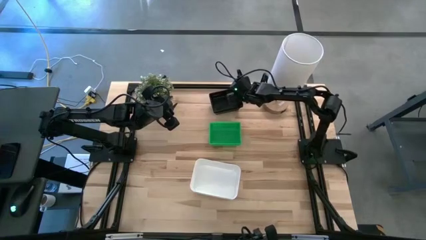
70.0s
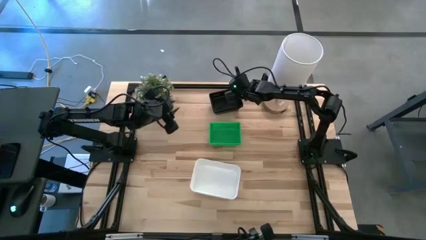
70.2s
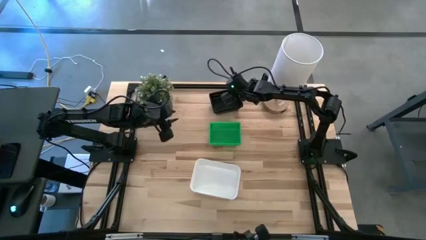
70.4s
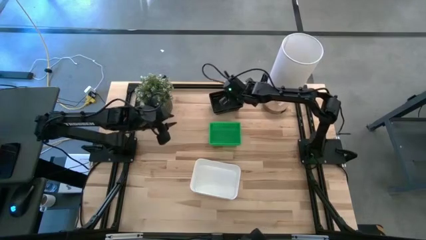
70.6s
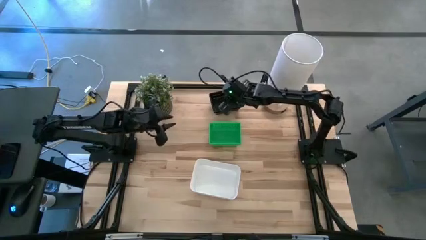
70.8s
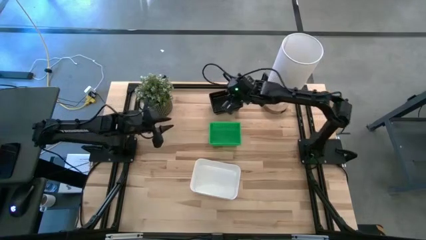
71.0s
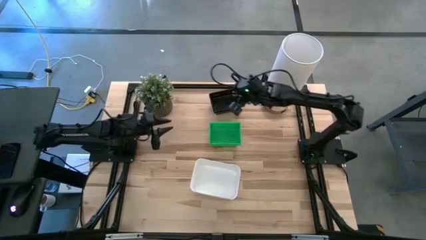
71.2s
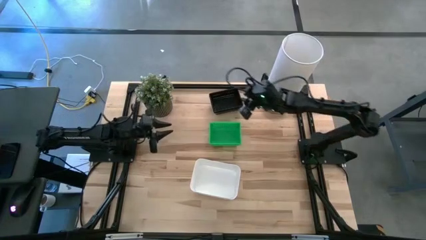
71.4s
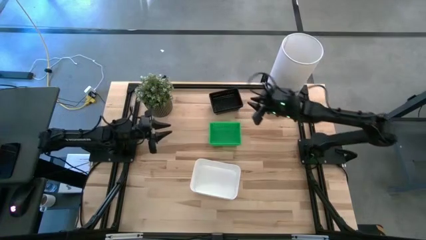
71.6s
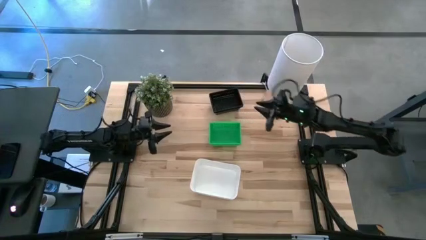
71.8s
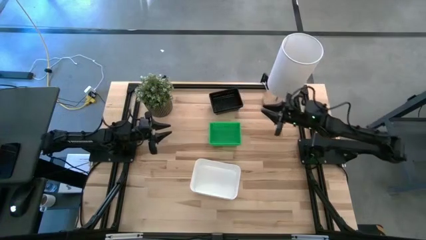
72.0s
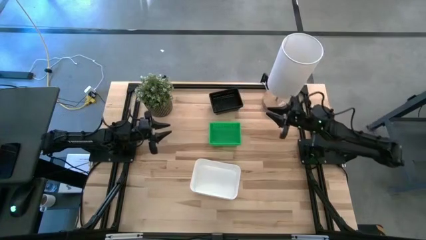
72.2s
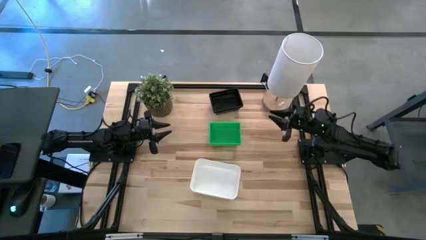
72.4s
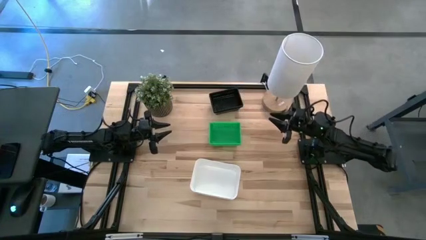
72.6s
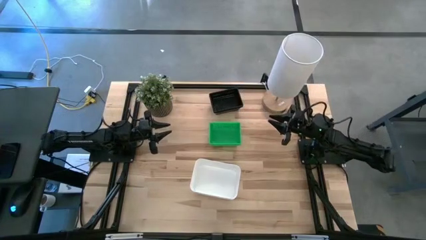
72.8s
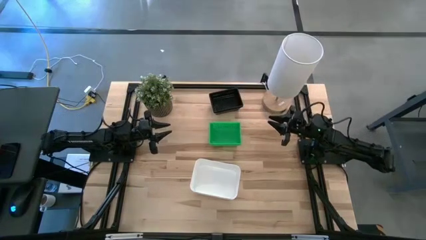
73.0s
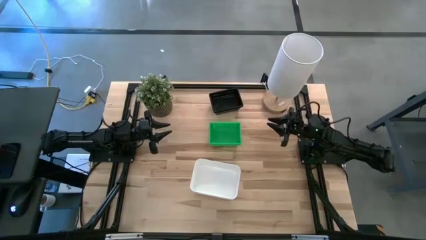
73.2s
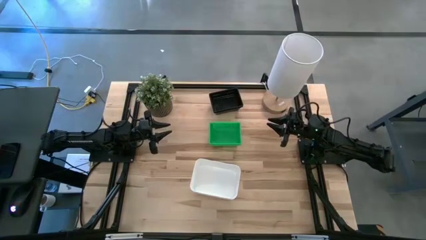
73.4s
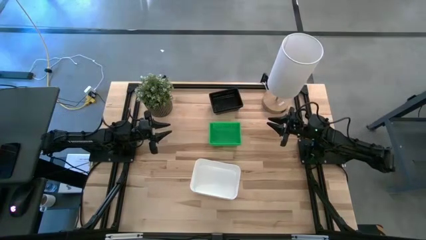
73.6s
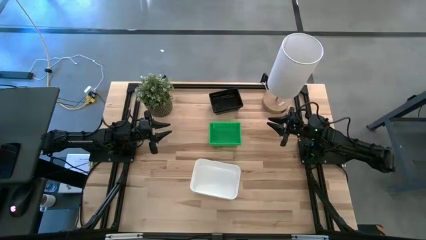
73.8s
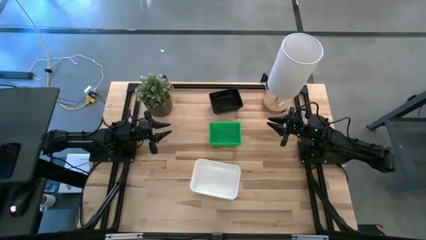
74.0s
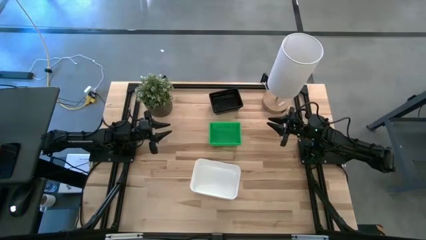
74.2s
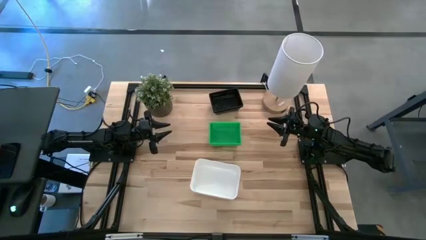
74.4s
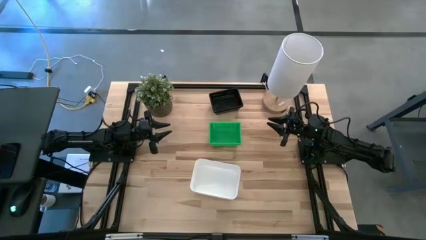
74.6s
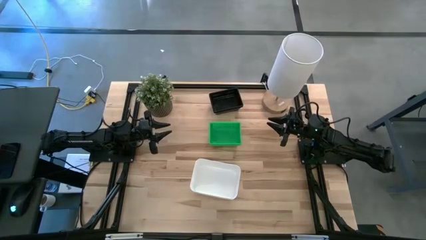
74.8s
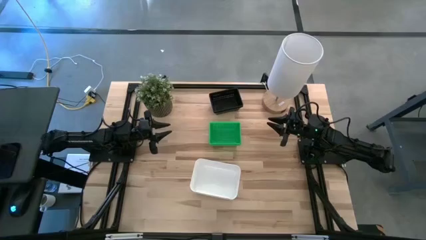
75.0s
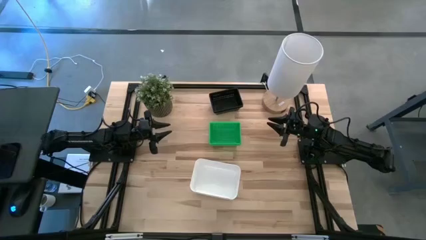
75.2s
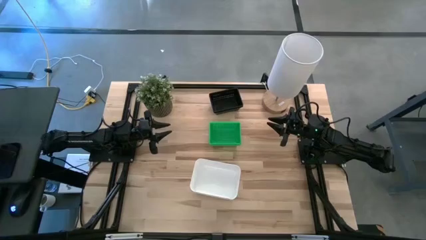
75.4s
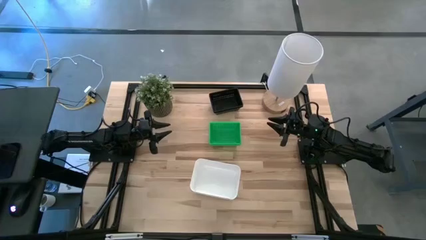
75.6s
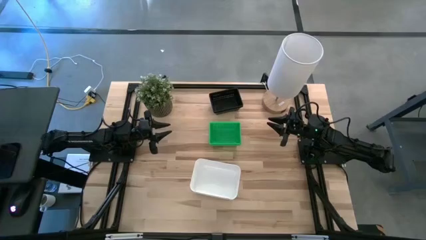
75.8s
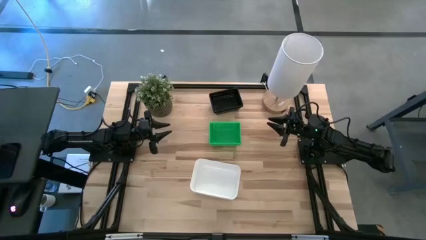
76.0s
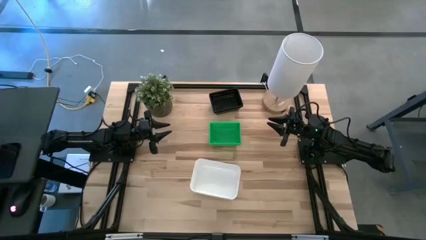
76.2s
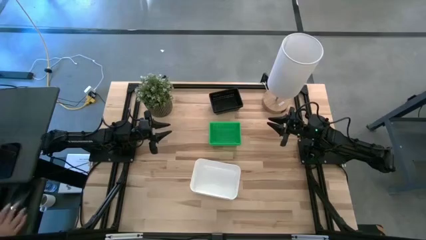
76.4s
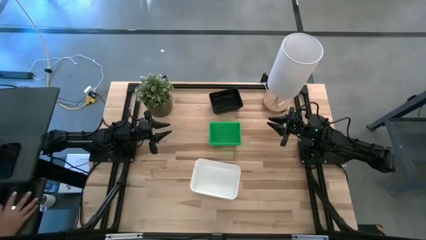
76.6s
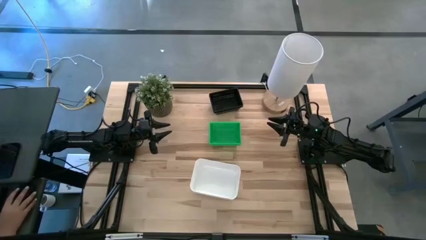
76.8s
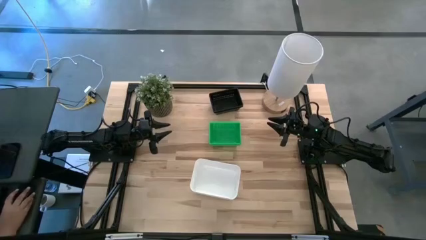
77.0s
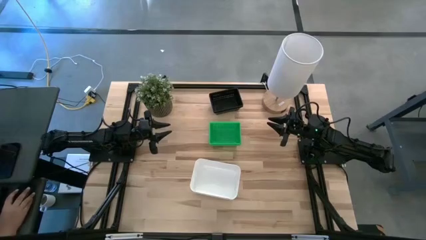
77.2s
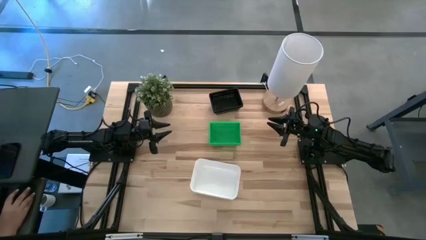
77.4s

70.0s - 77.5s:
Return to Home Position

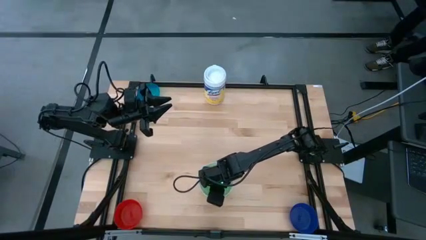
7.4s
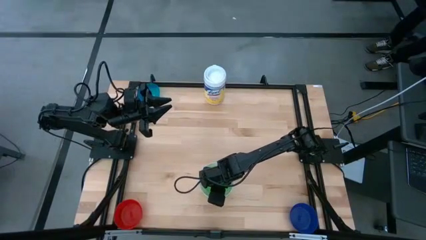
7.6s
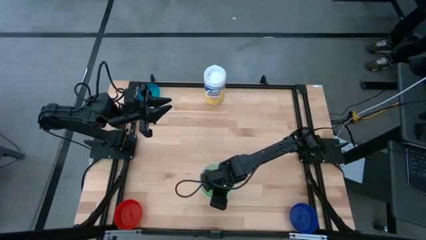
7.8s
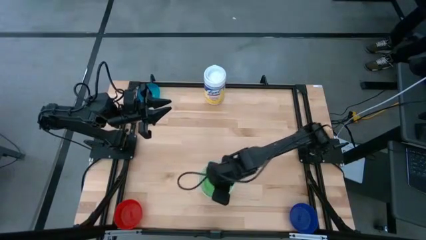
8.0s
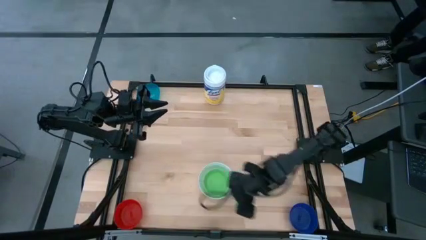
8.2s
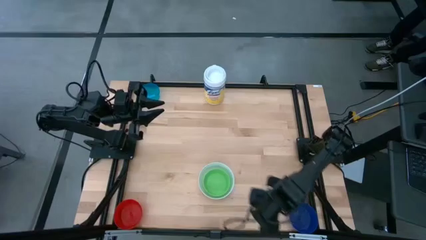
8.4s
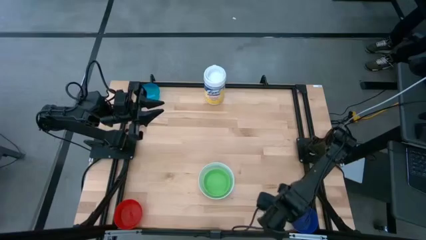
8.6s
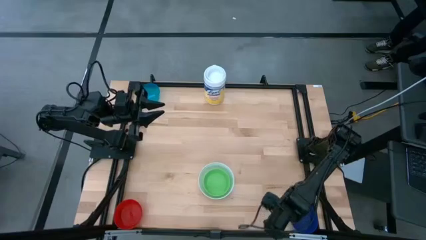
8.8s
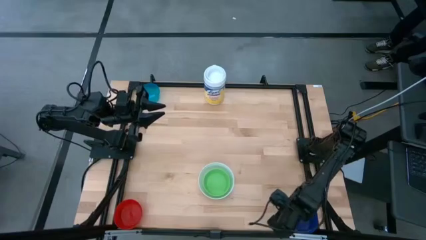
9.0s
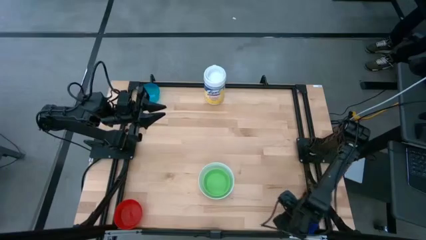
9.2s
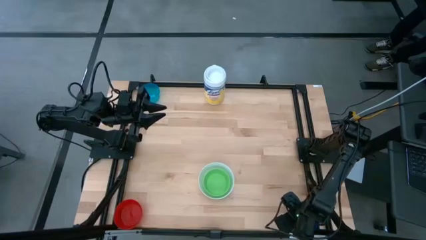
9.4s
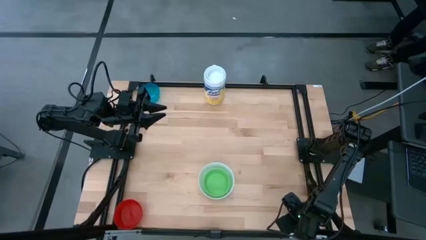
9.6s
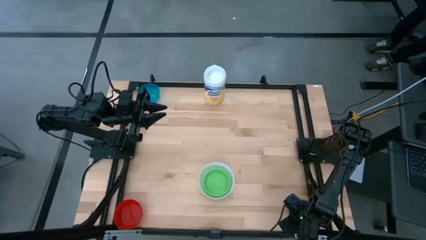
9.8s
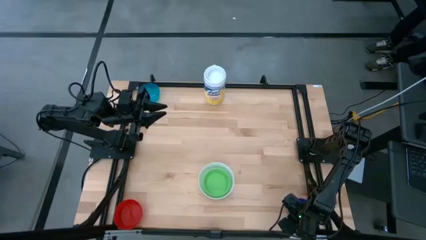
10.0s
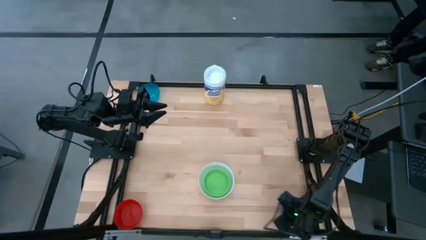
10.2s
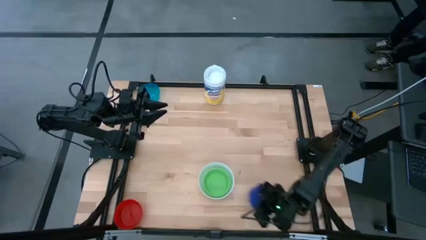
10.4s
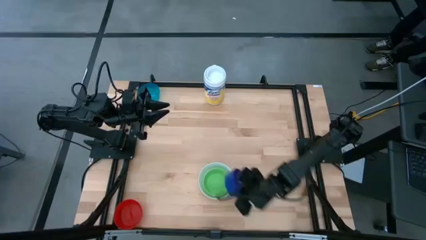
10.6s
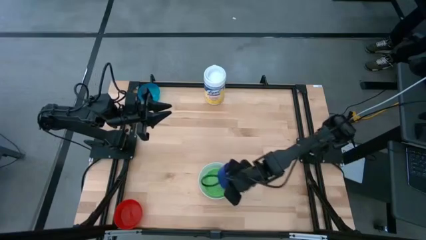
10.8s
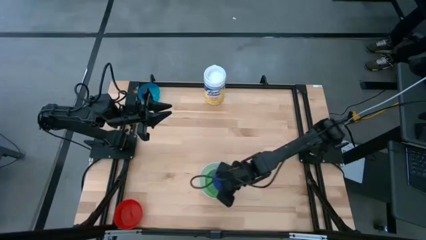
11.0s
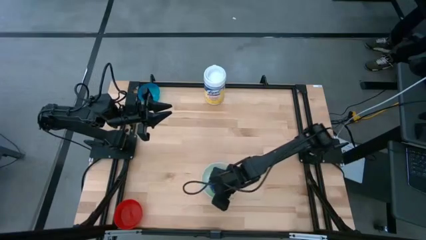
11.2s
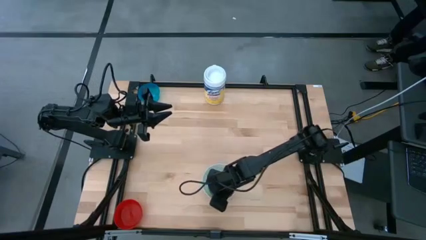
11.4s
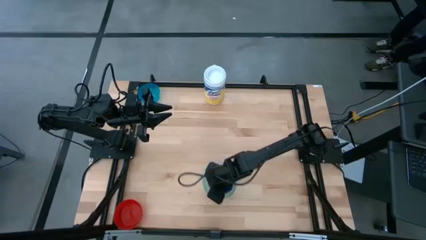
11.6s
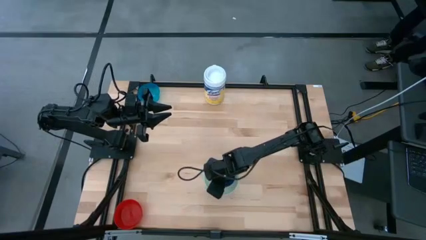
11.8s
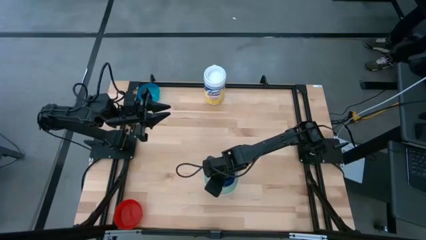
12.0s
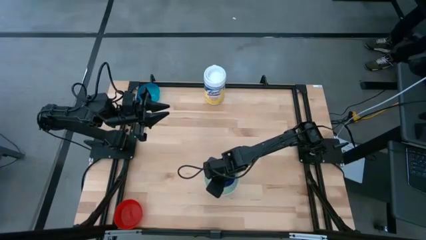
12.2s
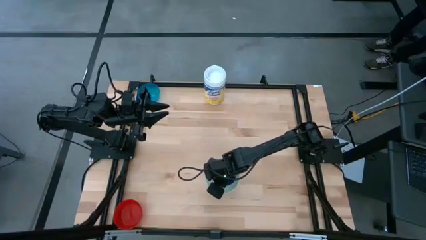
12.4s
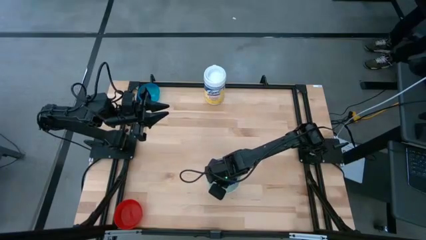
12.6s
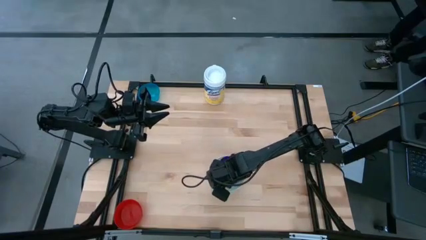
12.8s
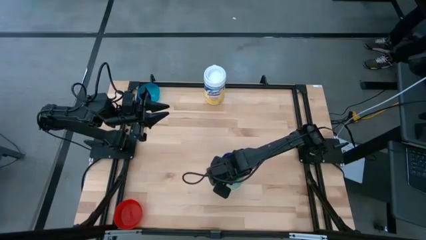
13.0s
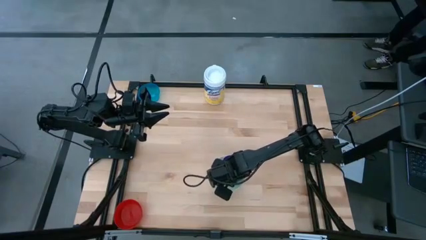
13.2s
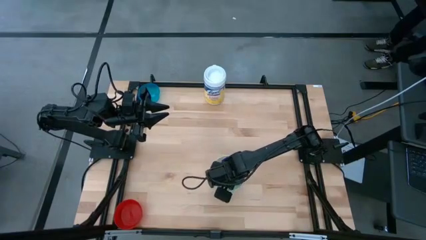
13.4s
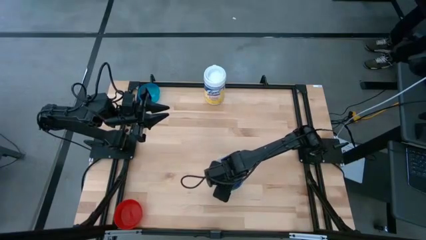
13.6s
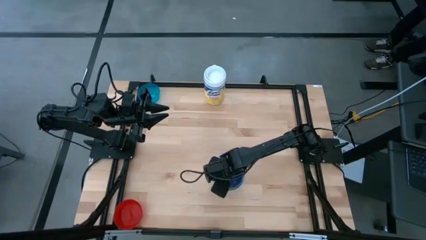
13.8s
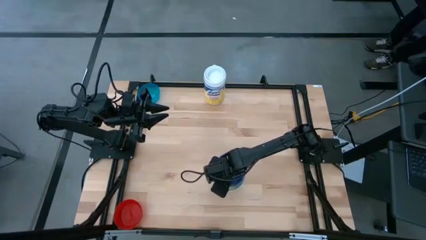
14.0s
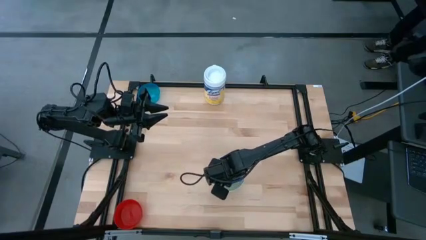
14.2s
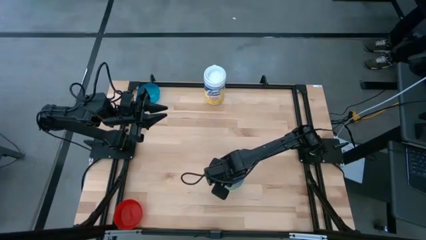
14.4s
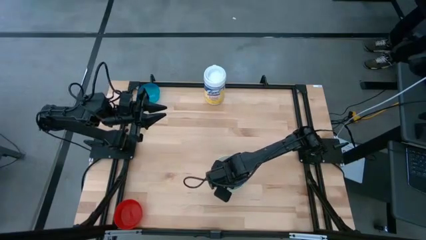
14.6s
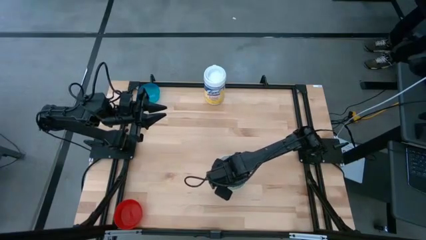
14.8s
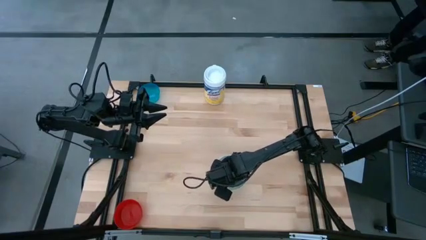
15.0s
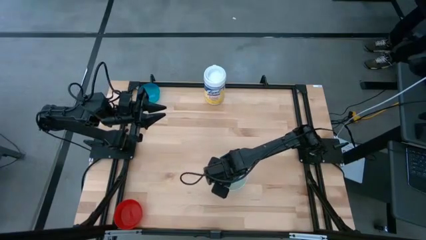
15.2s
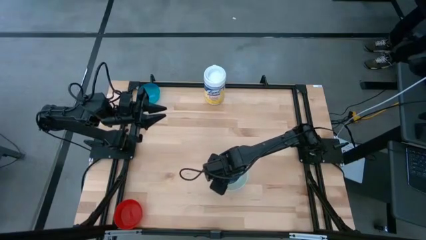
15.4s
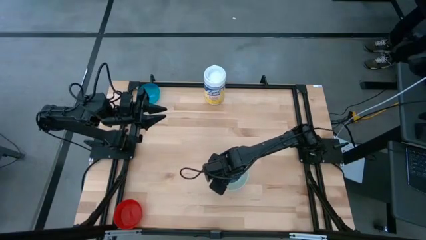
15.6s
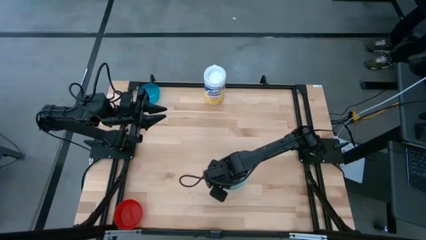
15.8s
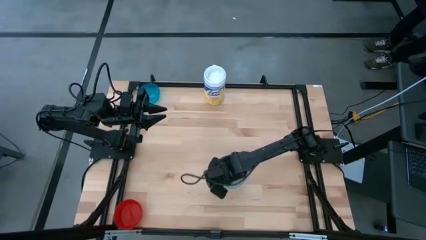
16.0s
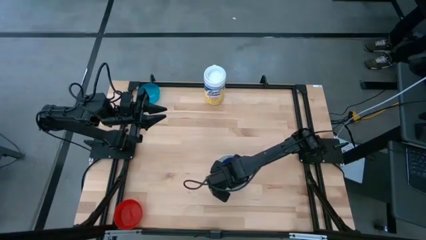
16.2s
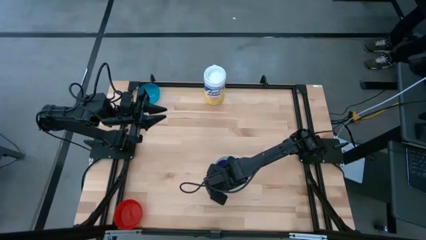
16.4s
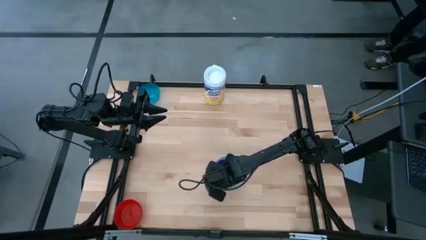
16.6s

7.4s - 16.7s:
Stack the blue bowl on the top of the green bowl
